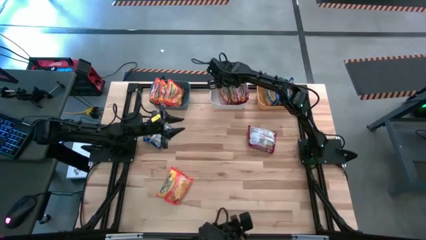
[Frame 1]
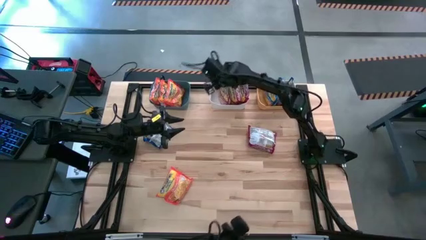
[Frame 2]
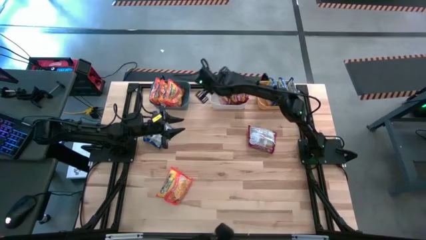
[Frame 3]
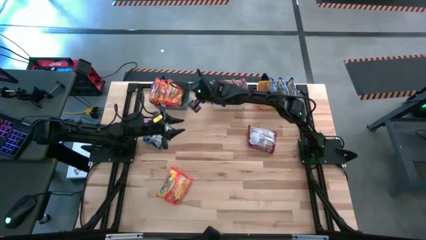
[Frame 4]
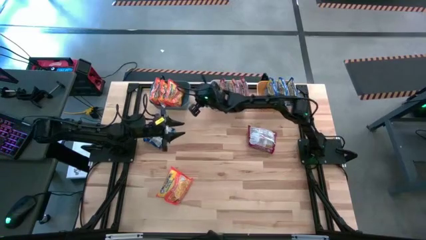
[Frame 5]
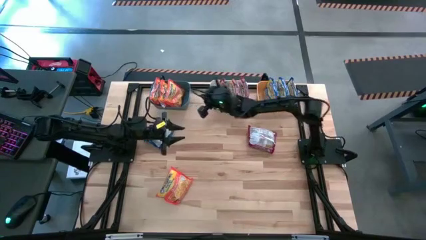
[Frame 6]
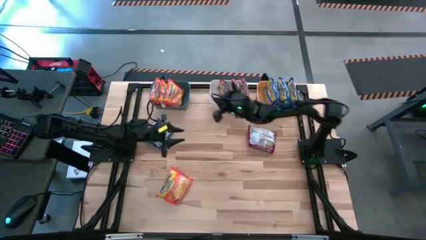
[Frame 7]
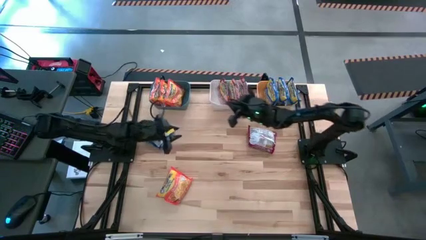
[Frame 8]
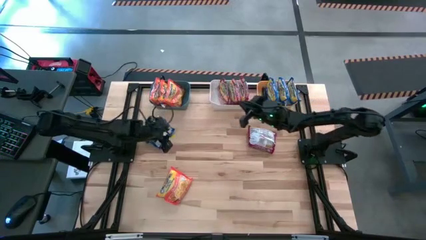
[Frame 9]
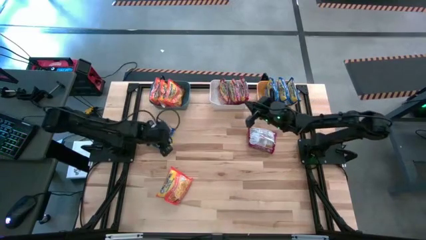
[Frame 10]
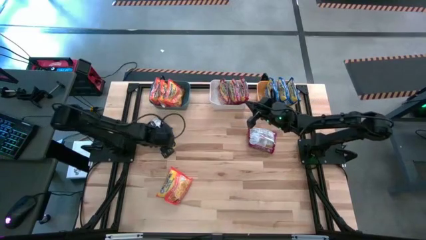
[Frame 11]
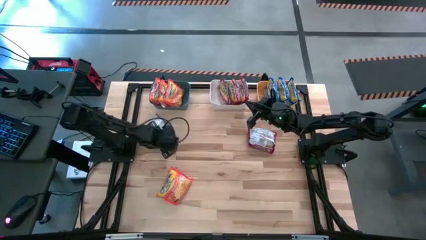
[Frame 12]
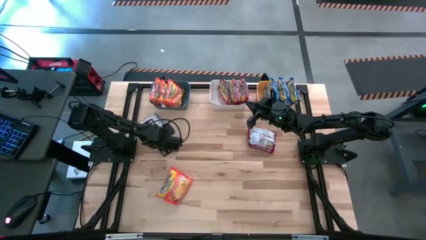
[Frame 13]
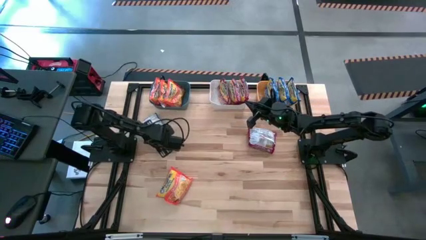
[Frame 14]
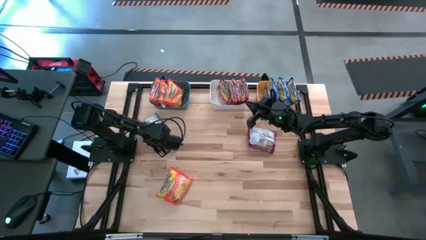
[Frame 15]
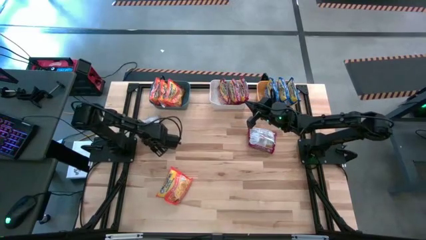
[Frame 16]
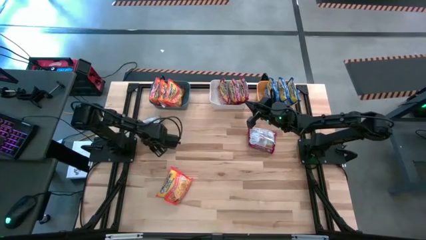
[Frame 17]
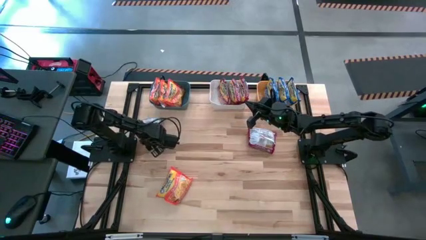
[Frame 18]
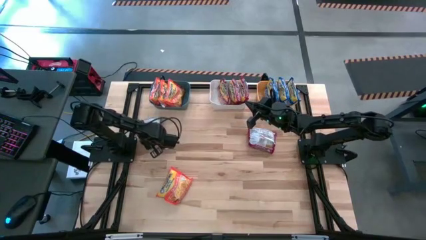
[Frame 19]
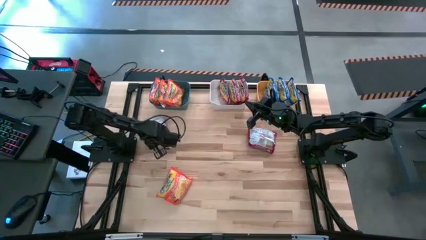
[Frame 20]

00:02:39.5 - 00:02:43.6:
Task: Sort Maruchan noodles
Put the blue noodle pack into the yellow bin

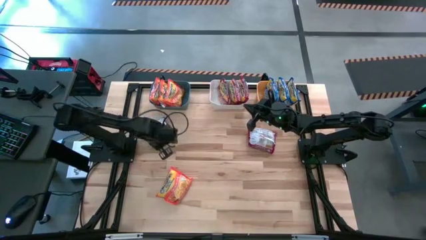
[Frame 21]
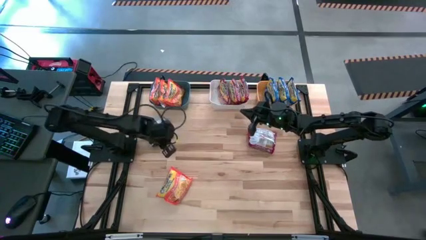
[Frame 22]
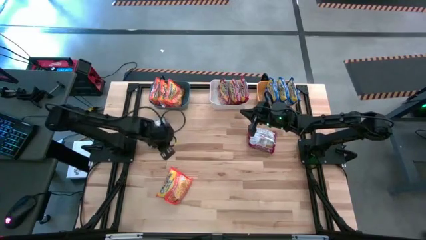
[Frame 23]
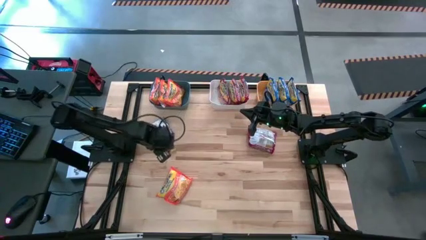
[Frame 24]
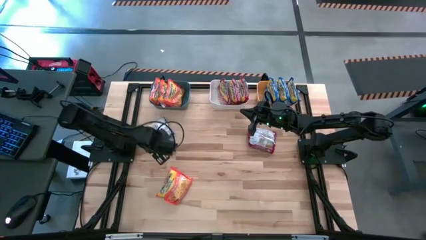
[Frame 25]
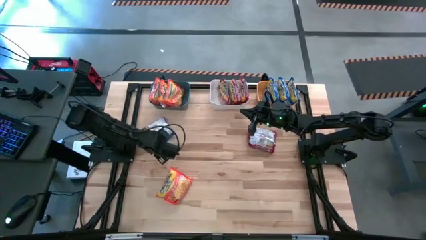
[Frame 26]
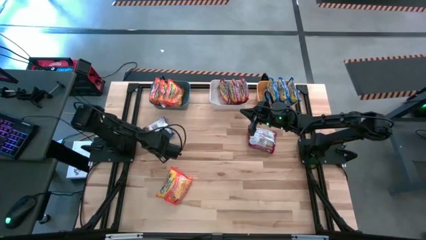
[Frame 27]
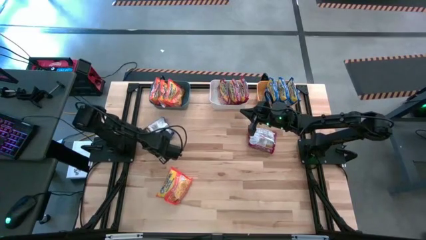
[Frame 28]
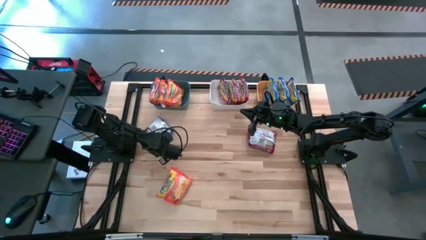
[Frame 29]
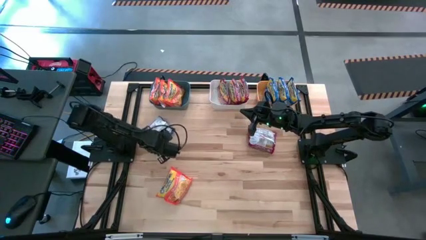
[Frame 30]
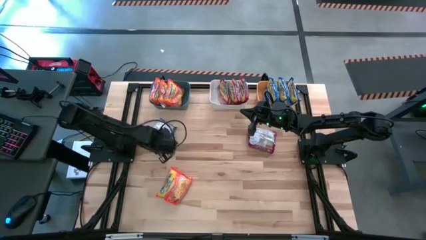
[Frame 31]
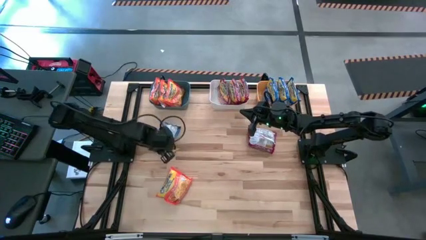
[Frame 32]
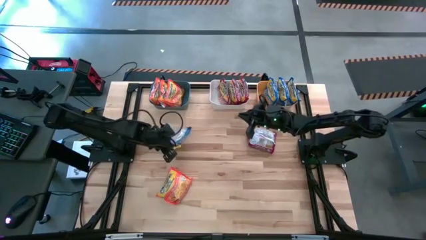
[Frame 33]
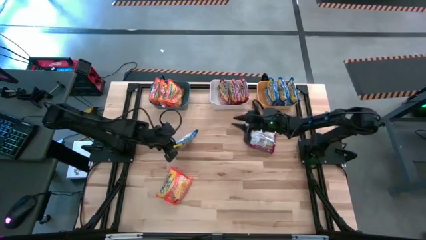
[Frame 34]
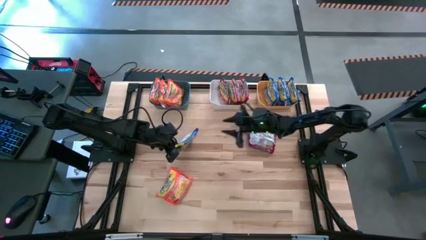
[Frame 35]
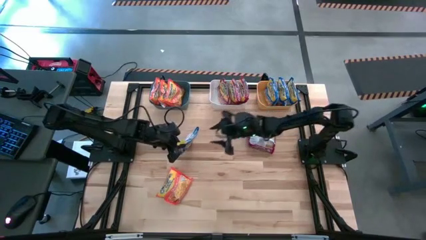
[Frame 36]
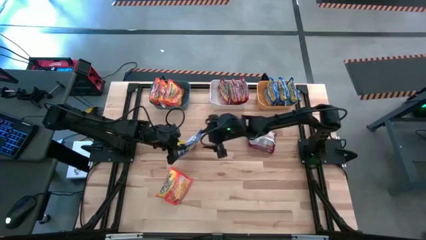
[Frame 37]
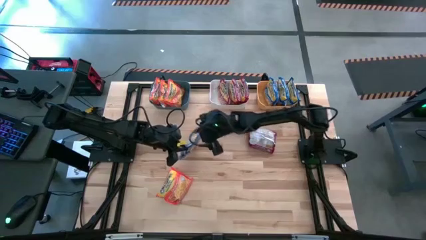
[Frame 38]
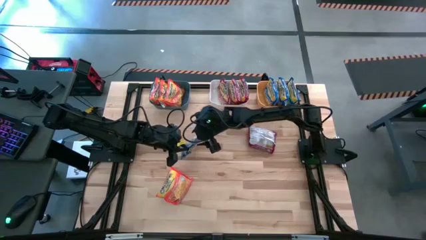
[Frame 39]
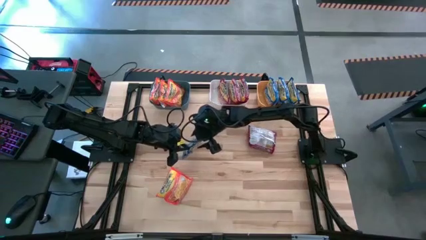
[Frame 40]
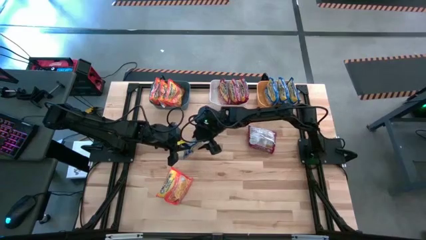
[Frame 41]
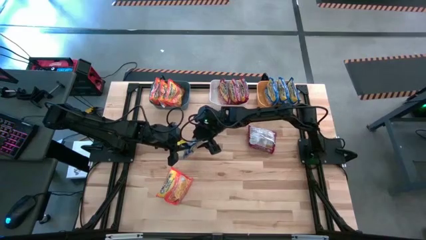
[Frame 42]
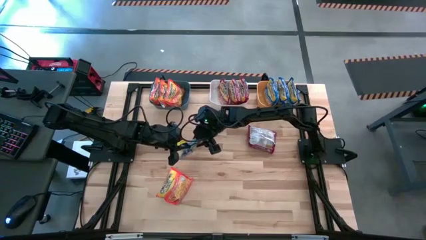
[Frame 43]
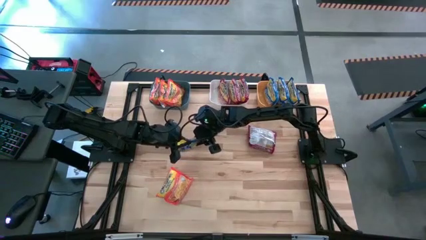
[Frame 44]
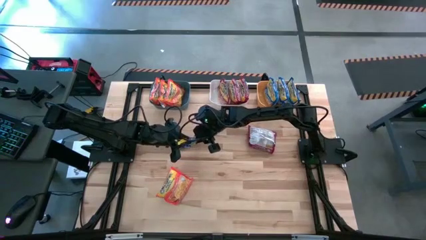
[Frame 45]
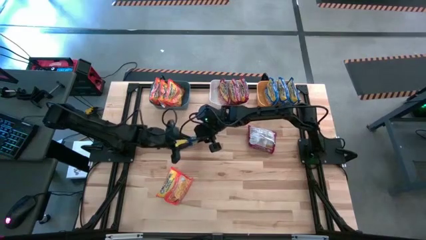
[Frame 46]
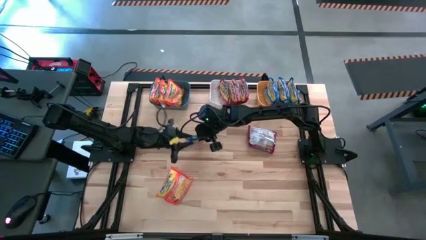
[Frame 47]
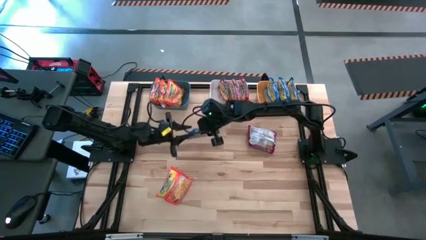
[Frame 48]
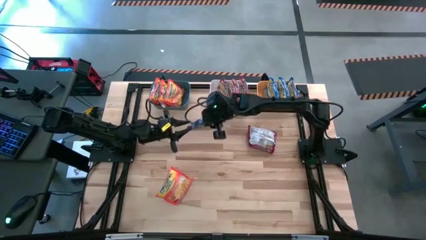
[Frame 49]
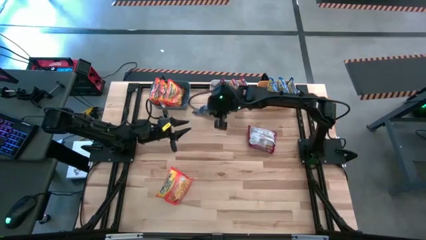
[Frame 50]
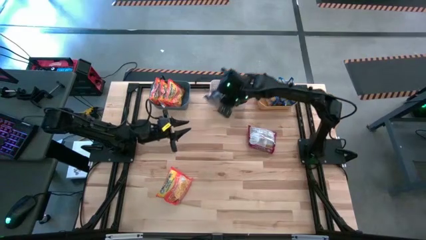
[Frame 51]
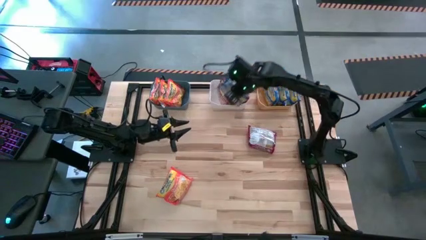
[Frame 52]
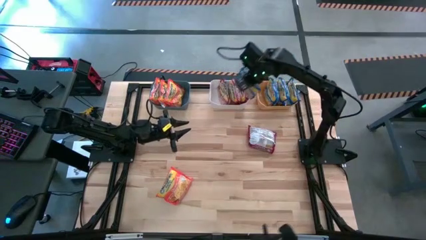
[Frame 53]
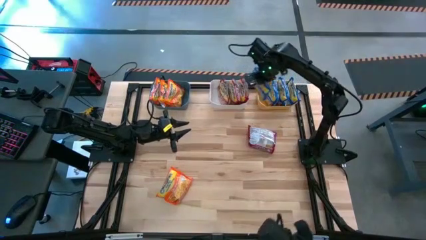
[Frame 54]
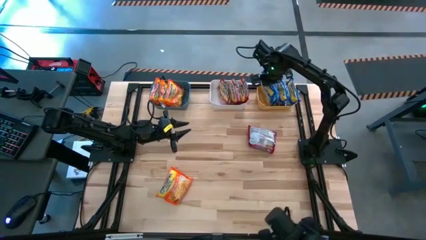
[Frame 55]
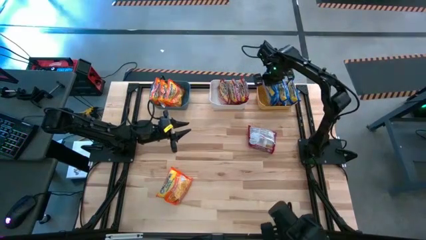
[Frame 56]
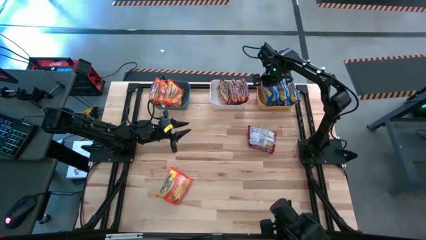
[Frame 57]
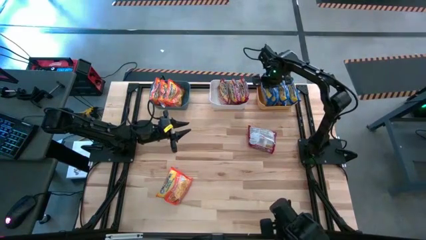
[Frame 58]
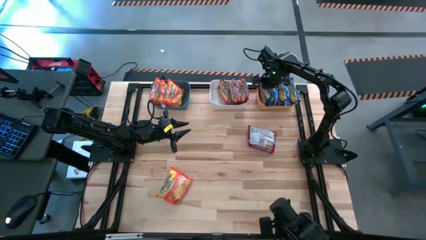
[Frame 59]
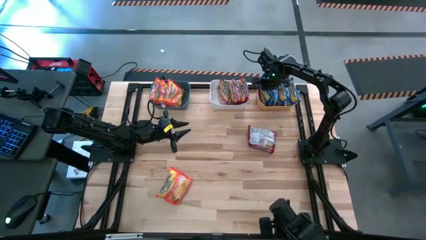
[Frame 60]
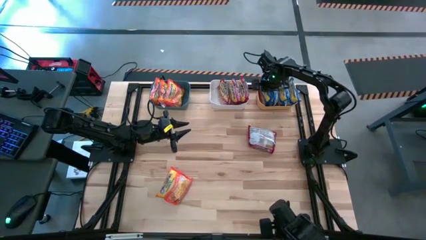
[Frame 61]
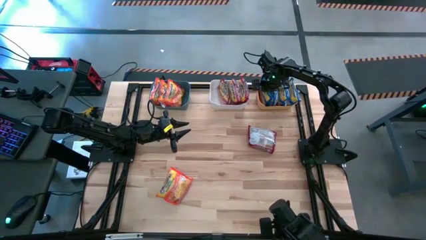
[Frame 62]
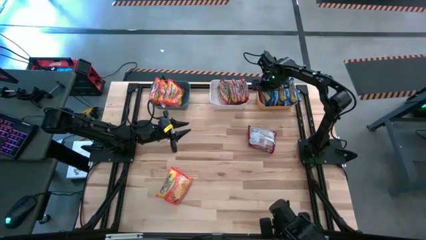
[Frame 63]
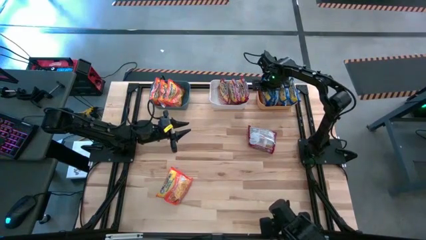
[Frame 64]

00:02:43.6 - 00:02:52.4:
Put the blue noodle pack into the yellow bin

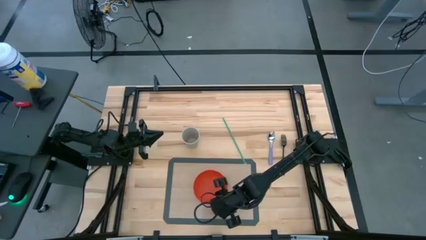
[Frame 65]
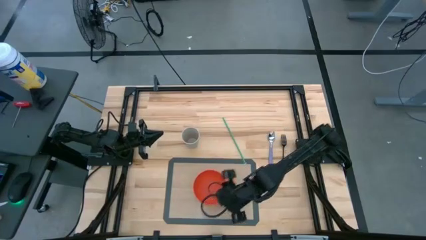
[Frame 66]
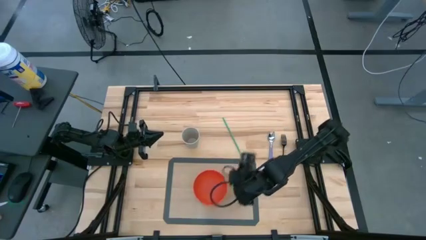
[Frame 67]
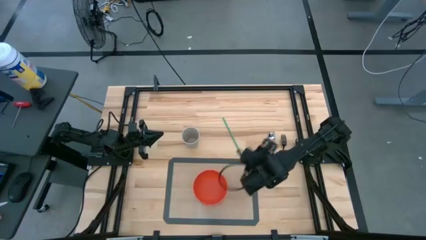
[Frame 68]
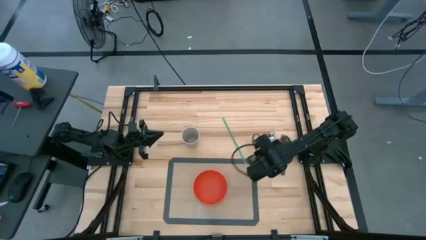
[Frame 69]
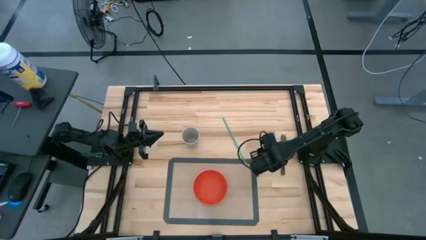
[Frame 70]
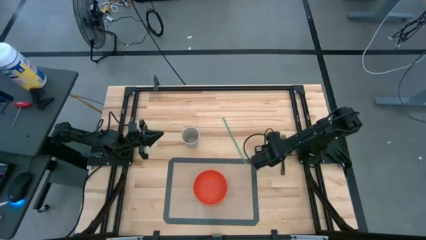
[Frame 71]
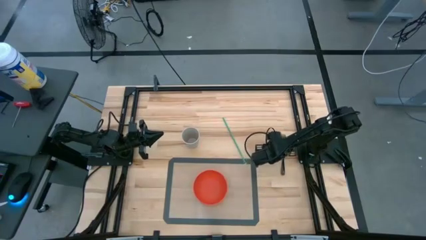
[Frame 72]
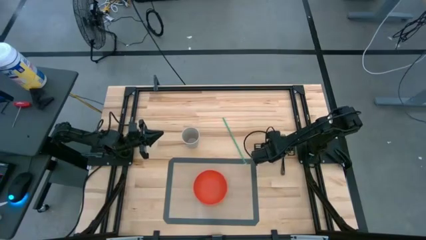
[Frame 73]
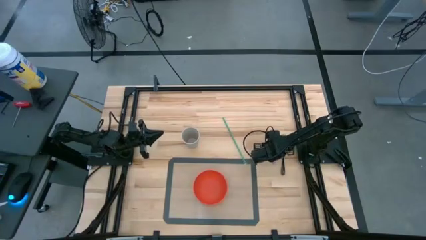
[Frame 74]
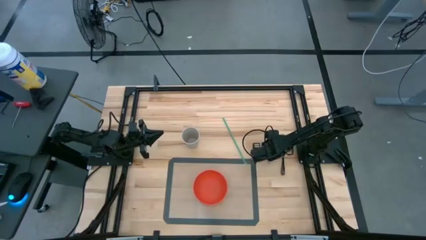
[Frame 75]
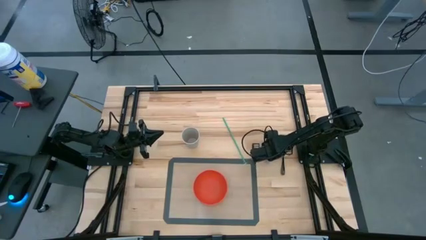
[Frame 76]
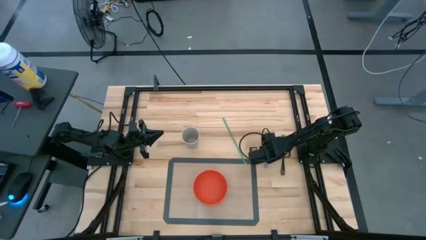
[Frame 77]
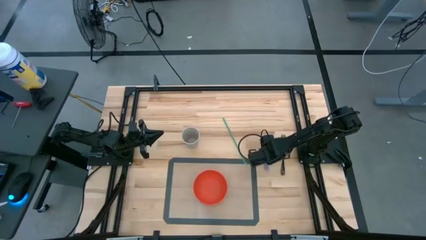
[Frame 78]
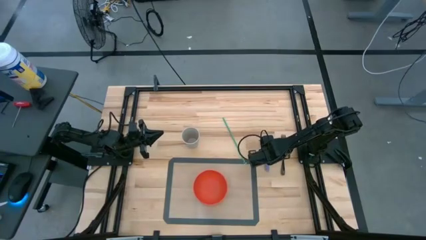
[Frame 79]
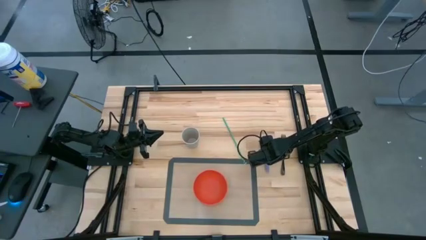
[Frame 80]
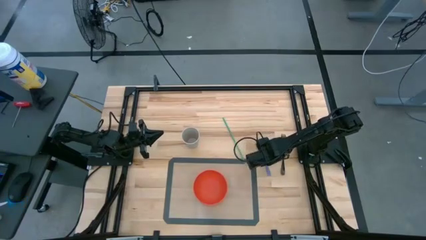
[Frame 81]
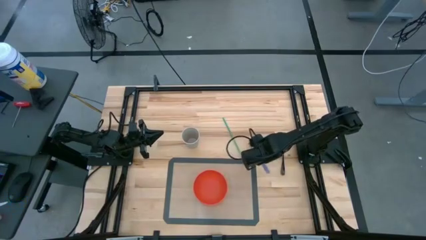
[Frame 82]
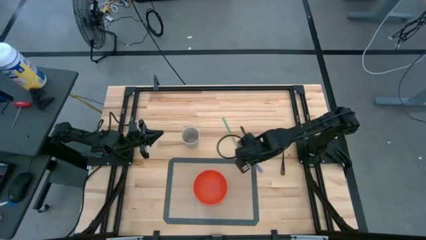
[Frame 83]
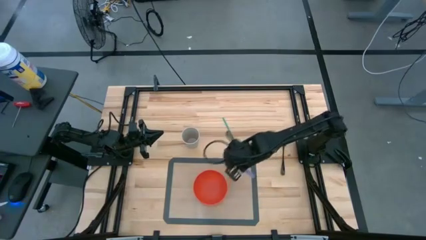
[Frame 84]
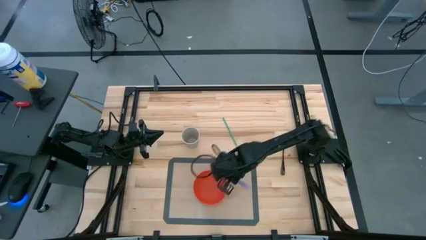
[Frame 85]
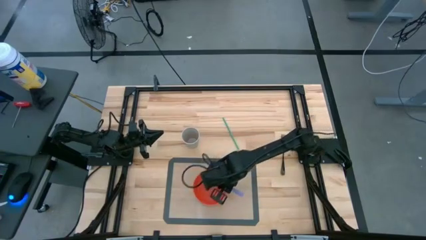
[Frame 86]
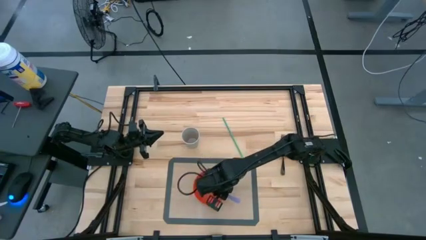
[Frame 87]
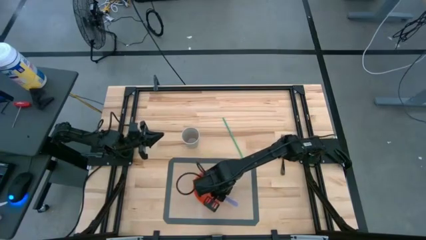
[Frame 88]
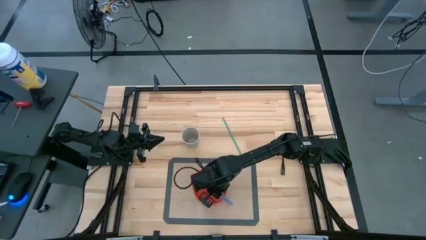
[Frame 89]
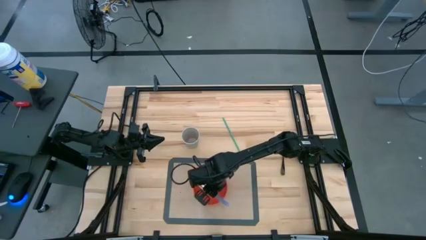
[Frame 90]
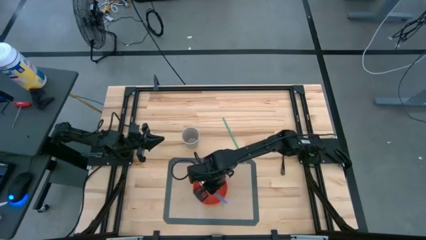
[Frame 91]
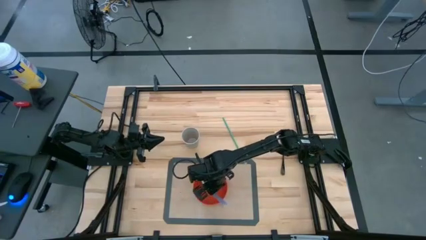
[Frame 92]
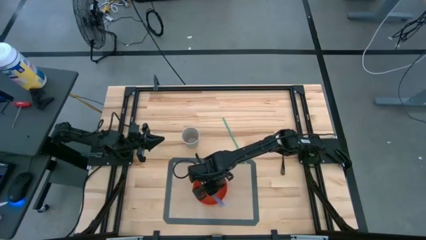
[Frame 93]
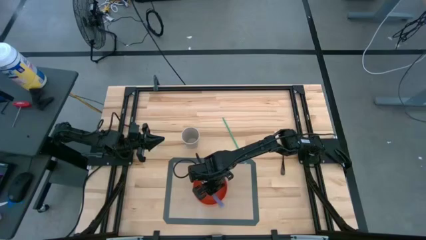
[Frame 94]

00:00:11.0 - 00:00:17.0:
Task: Pick & Place Utensil
Put the purple spoon into the orange bowl on the transparent mat
